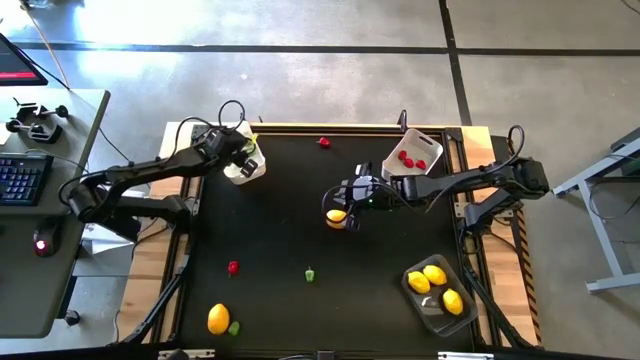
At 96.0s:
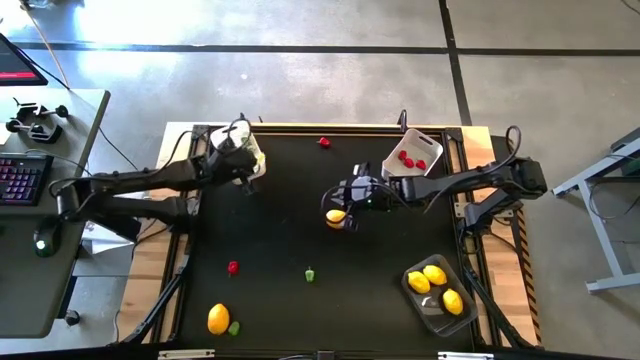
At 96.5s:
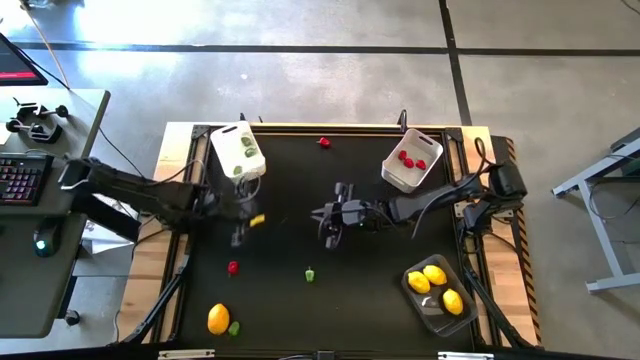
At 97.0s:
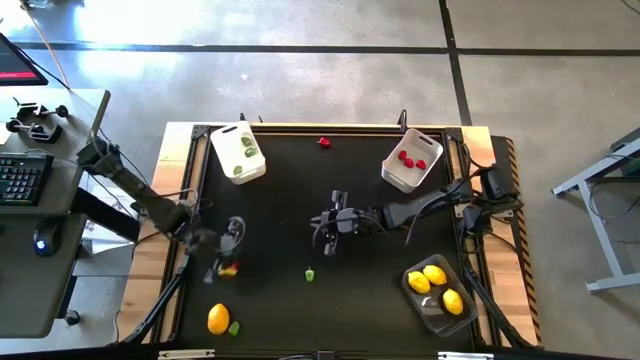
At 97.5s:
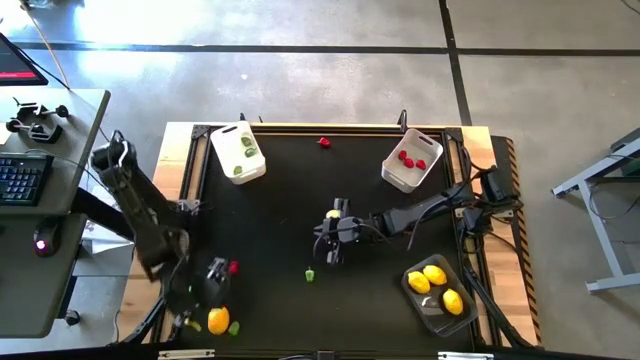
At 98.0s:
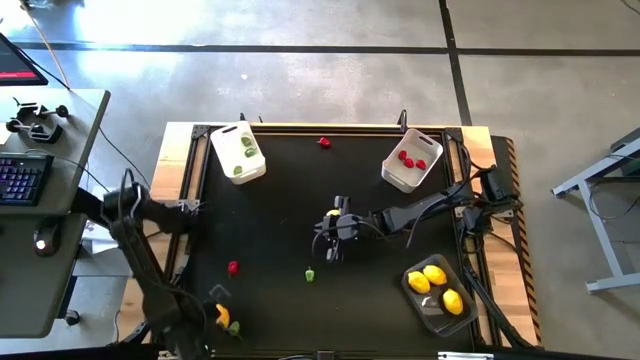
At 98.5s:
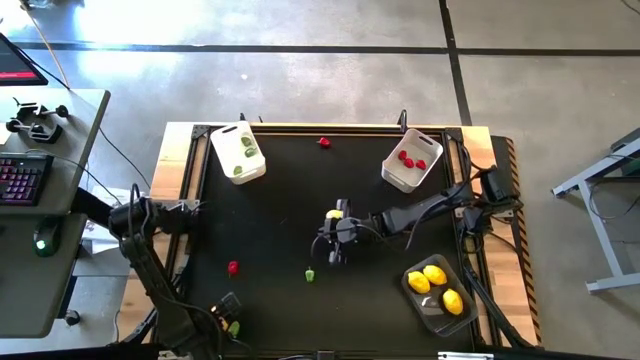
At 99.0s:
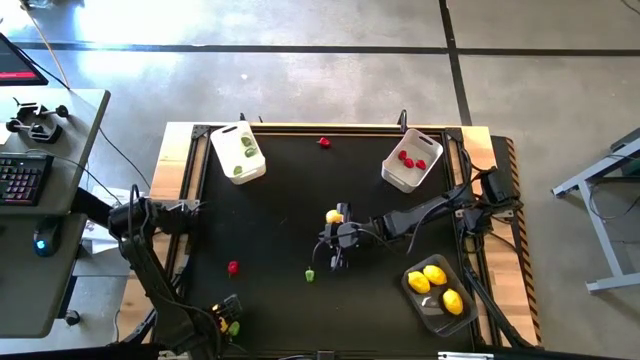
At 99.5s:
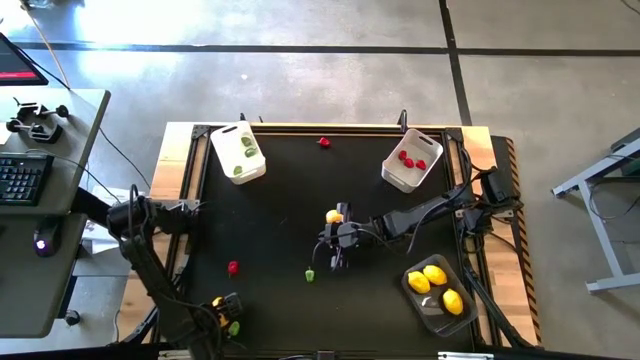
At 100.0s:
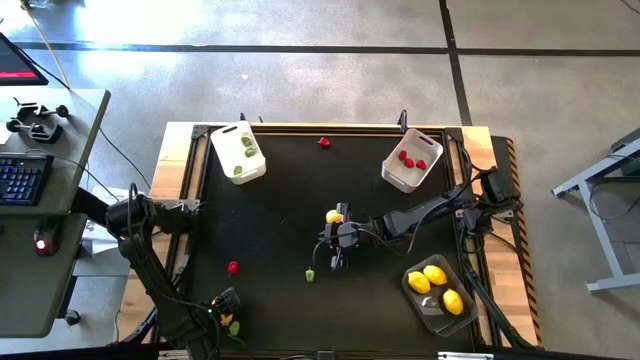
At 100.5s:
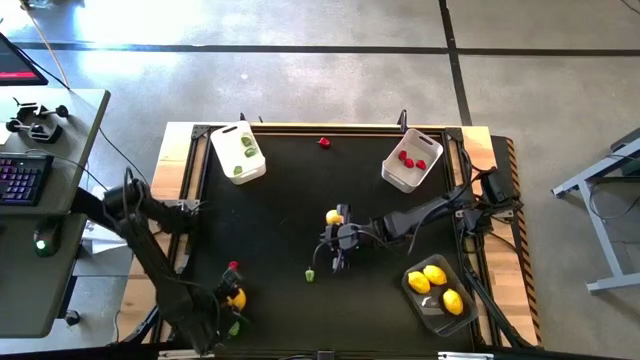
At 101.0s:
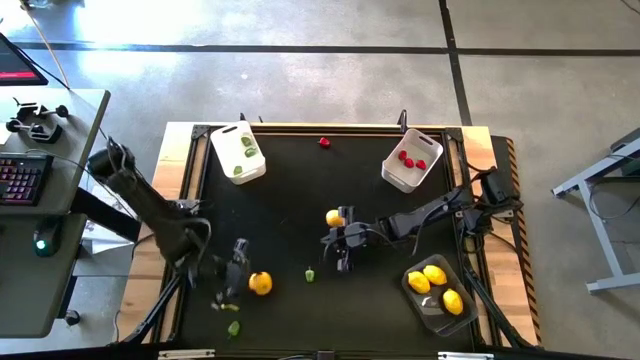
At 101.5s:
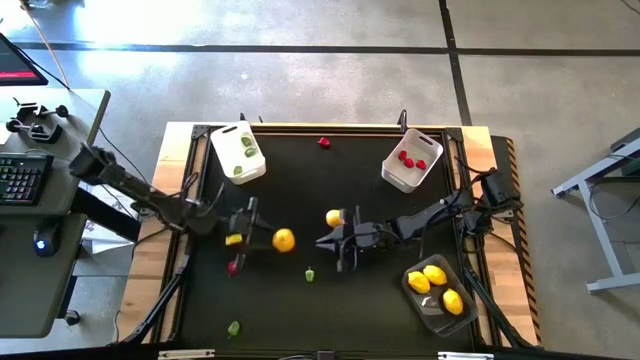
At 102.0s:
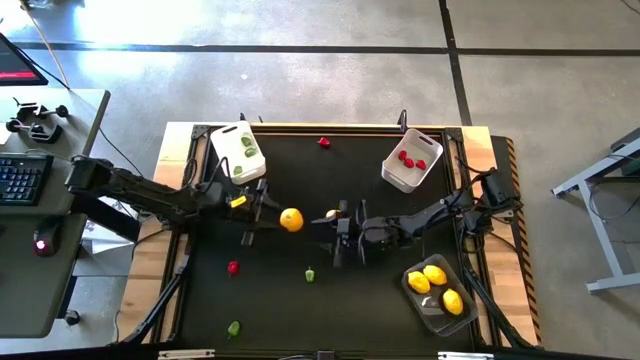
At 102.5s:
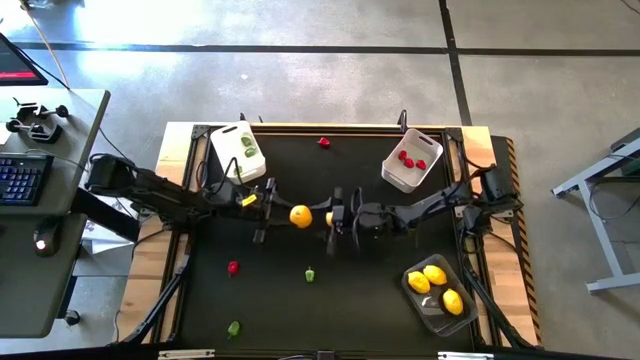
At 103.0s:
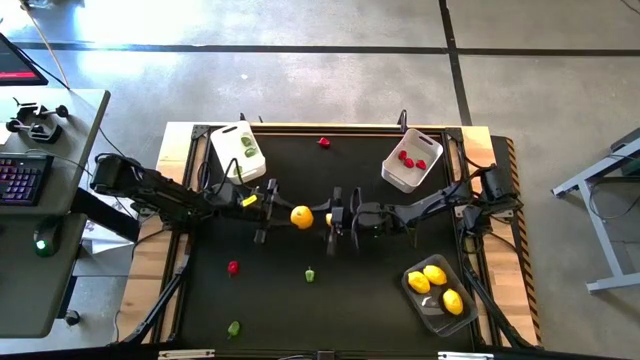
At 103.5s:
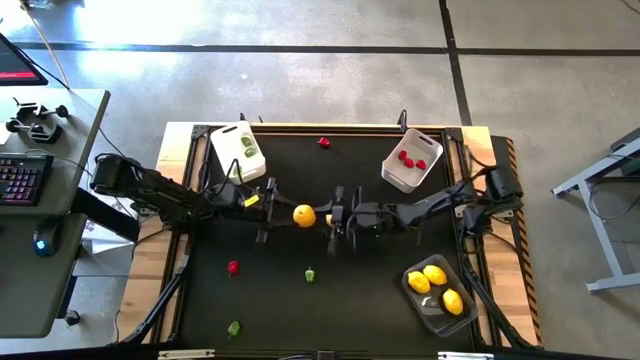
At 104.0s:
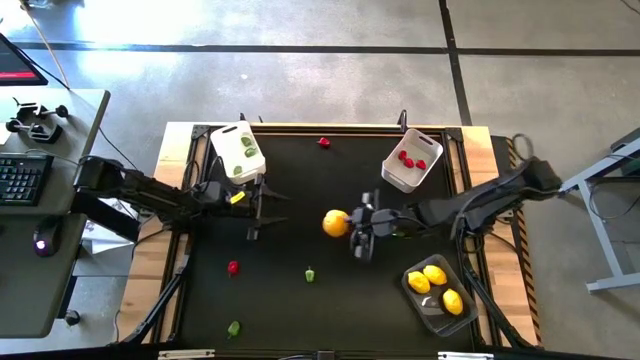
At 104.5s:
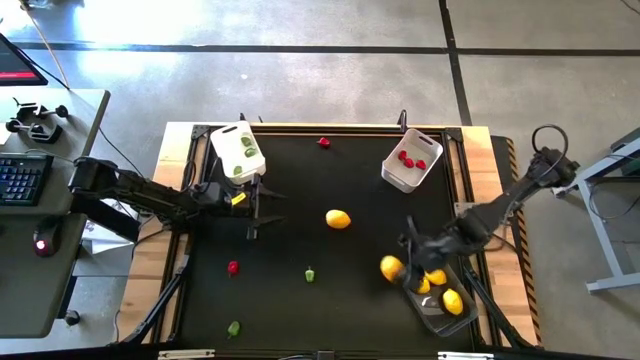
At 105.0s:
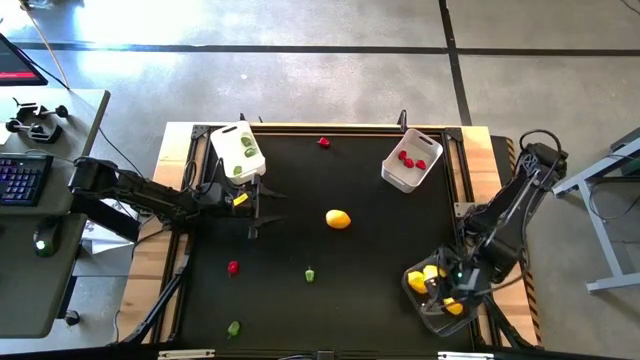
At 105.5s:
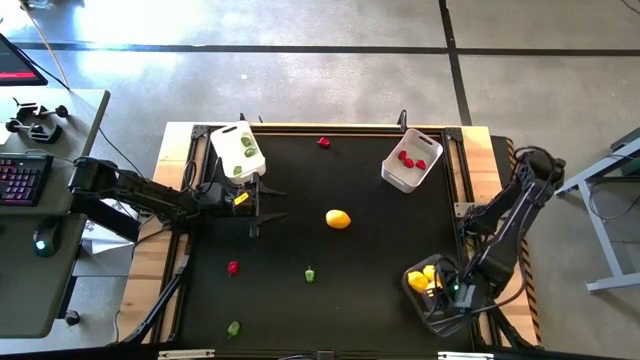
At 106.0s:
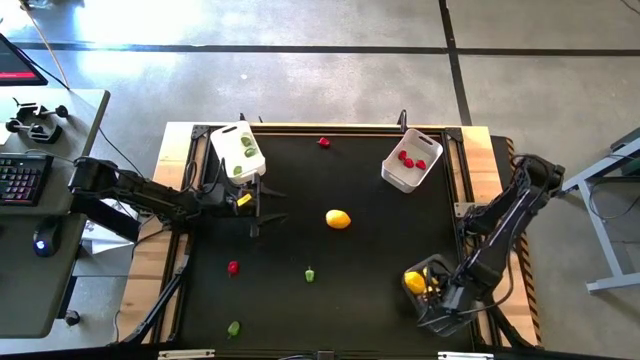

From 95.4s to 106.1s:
Task: Sort produce into baskets
Put the yellow lemon into the transparent bin

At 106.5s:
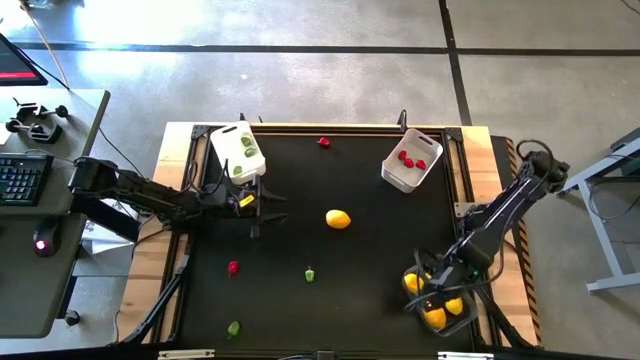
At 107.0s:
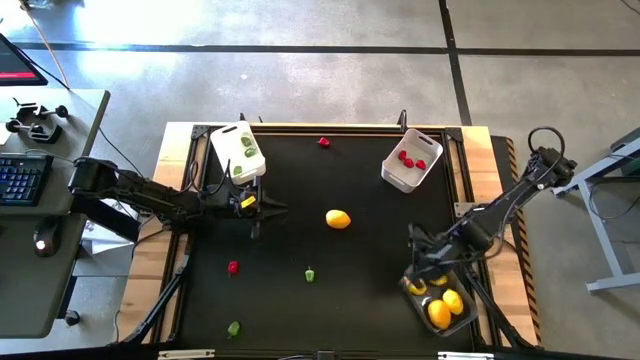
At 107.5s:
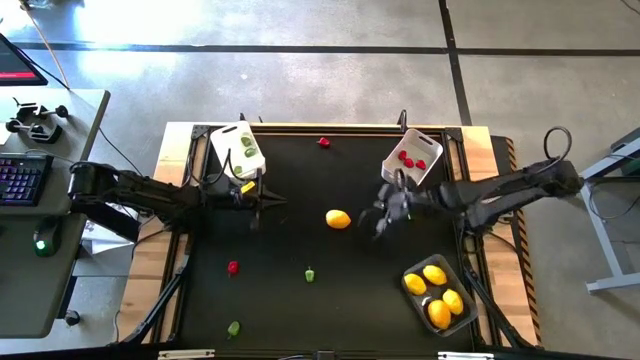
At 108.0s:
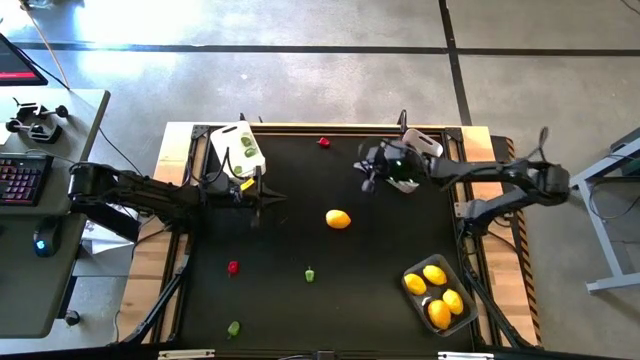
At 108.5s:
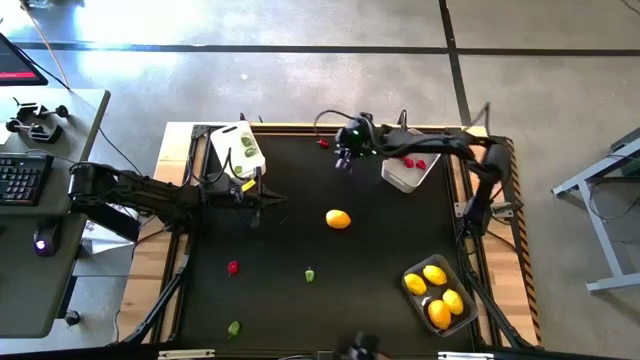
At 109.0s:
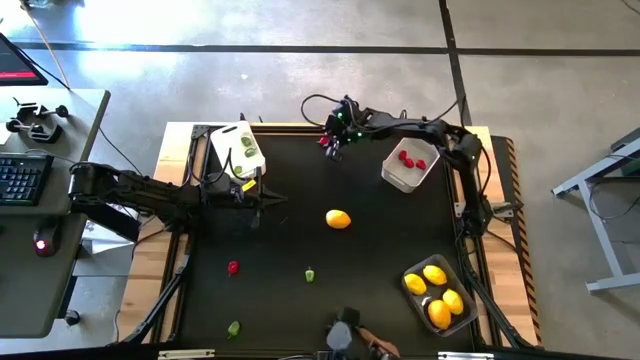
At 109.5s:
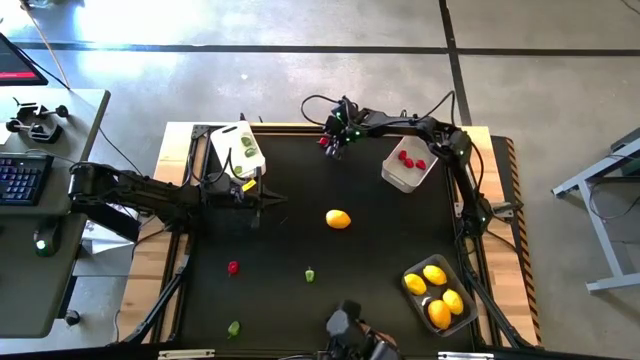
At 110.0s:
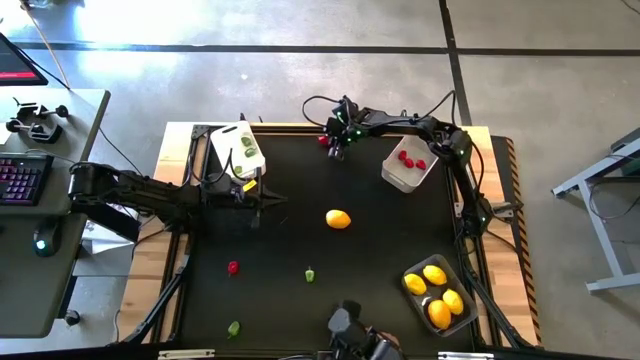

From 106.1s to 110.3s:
Put the red chili pepper into the gray bin

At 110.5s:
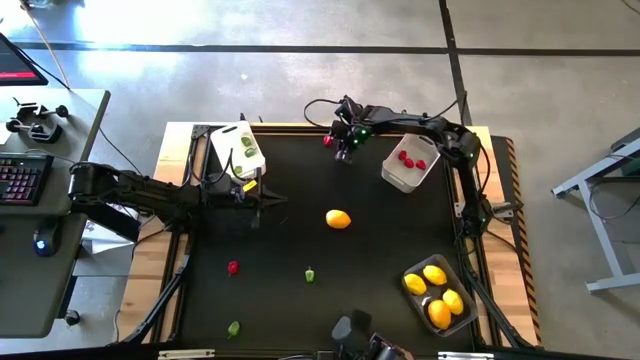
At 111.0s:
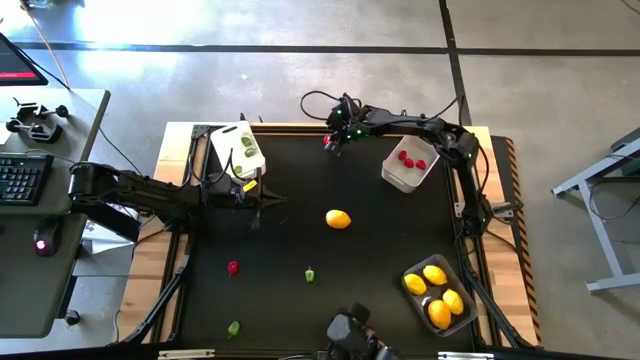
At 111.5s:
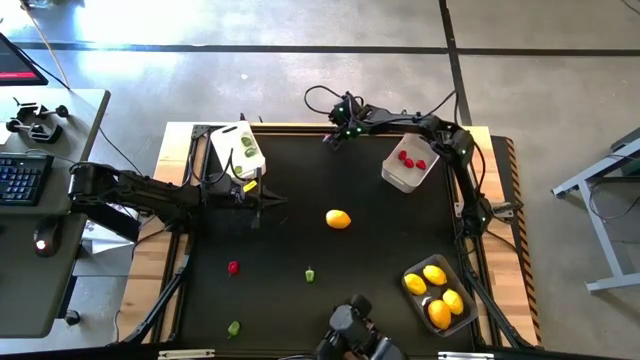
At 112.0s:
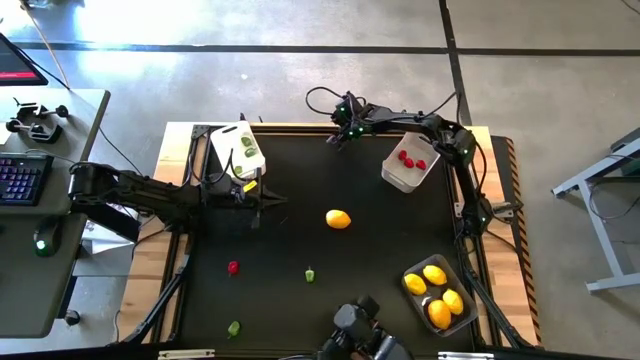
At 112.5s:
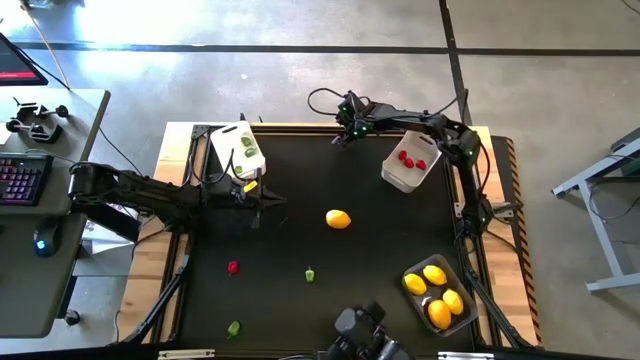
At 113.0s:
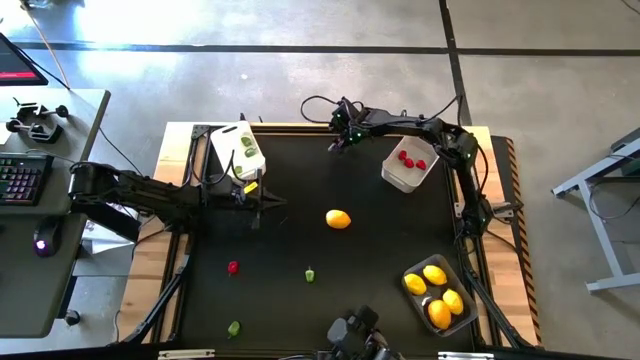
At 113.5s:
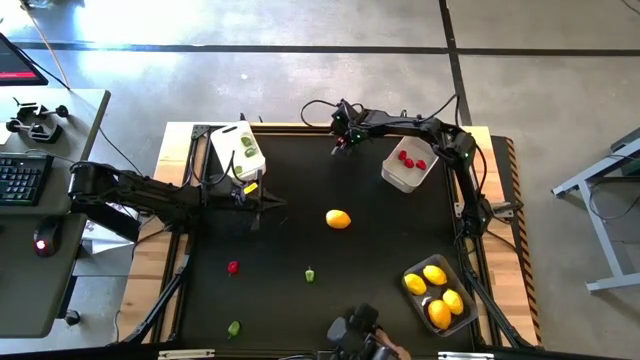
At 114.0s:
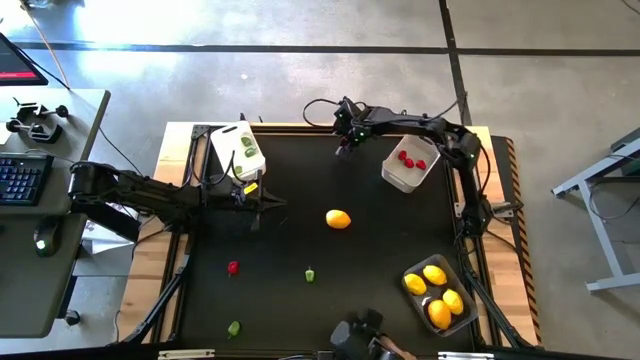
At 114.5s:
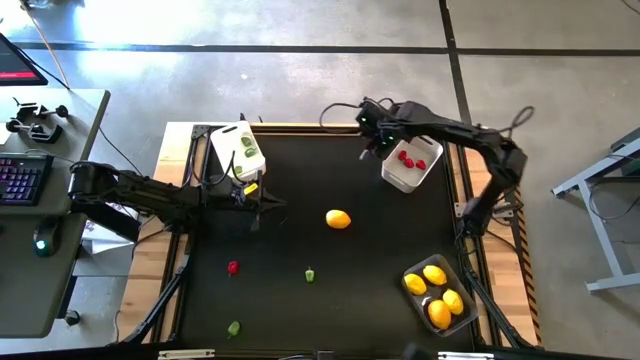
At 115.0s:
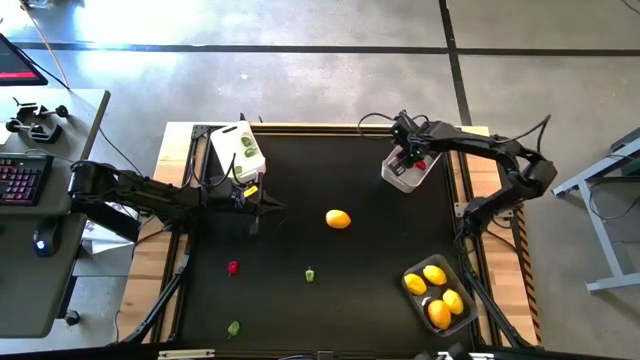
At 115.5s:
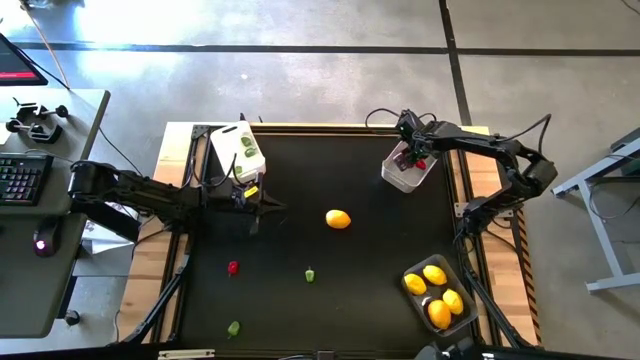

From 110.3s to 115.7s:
Put the red chili pepper into the gray bin

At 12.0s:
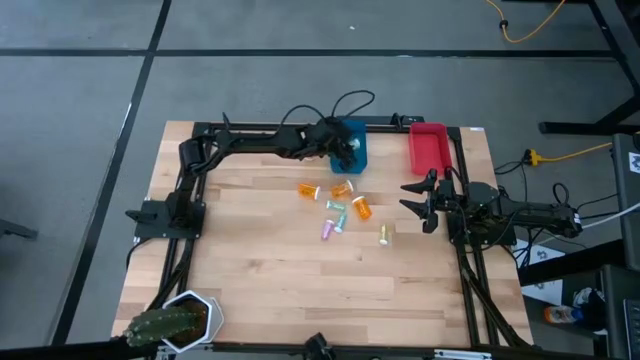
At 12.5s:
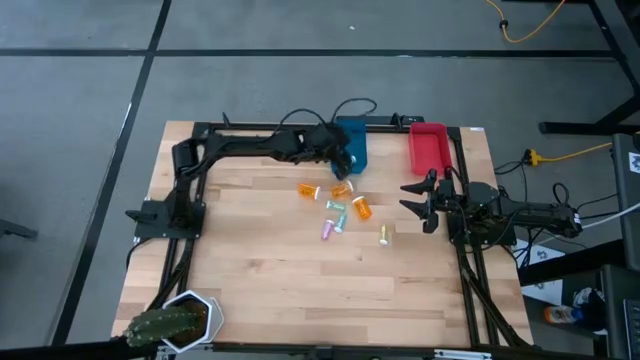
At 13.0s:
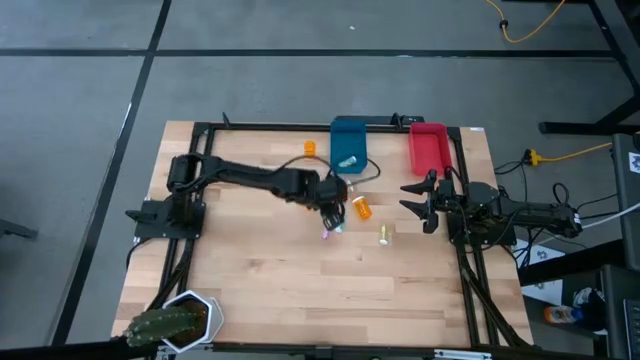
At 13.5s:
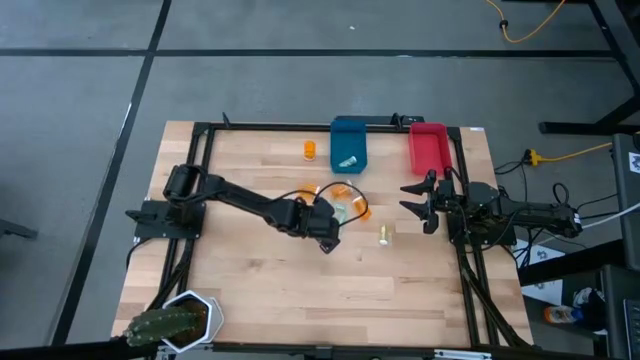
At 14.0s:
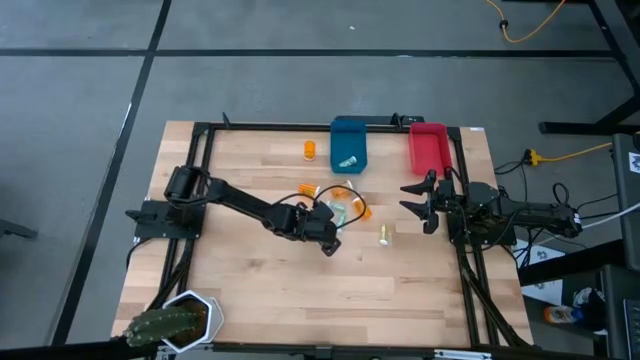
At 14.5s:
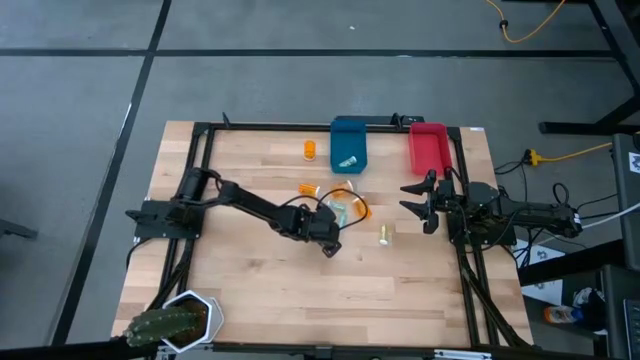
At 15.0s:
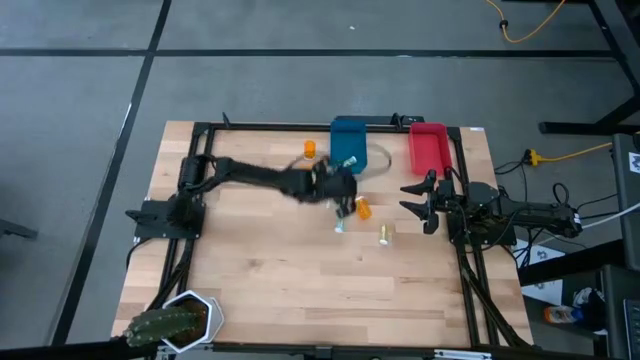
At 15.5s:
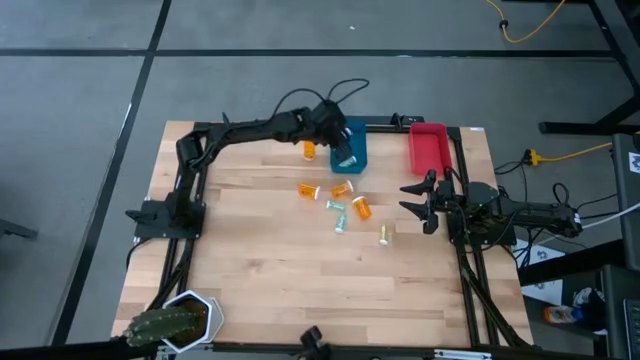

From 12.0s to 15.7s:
Task: Pick and place medicine bottles into bin by pill shape (circle, oval)
Put the small pink pill bottle into the blue bin
